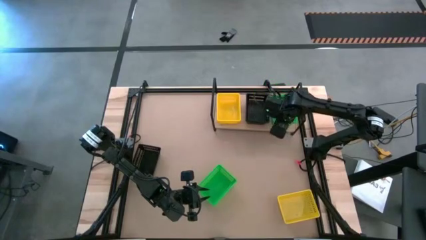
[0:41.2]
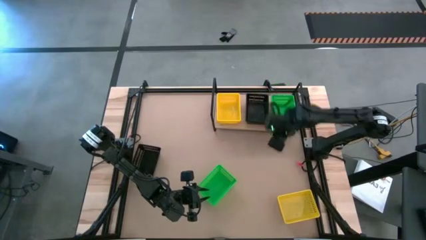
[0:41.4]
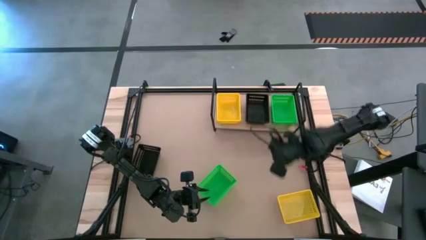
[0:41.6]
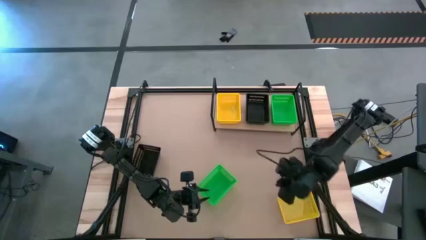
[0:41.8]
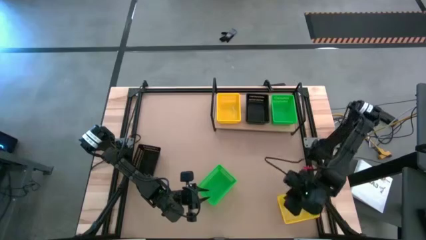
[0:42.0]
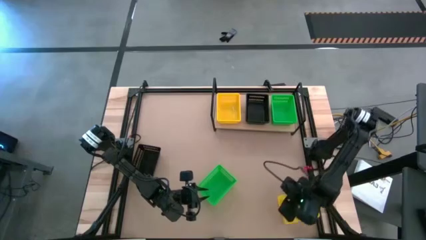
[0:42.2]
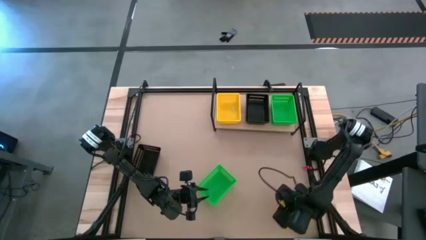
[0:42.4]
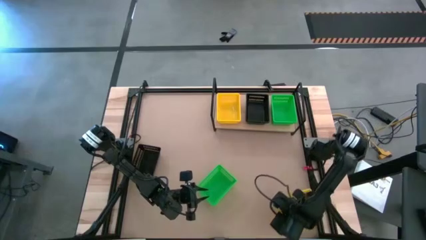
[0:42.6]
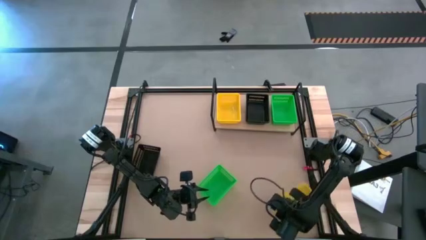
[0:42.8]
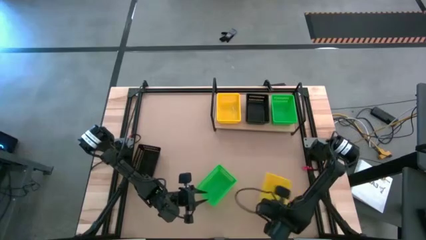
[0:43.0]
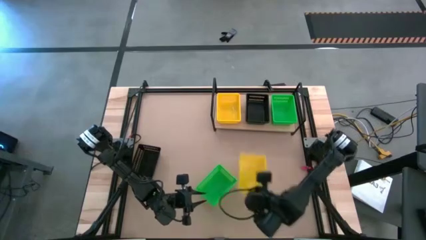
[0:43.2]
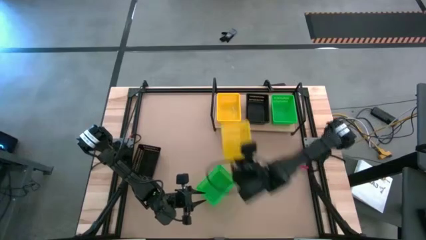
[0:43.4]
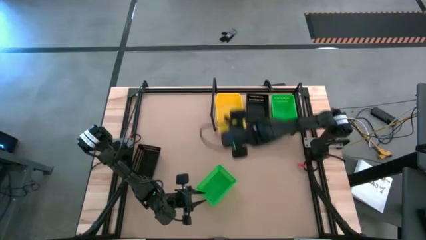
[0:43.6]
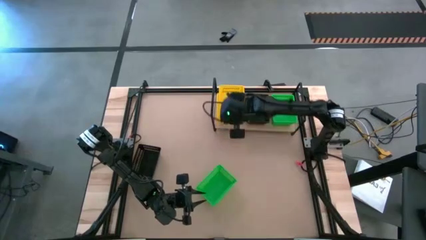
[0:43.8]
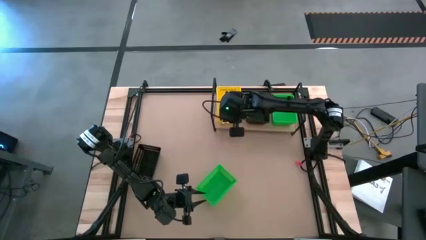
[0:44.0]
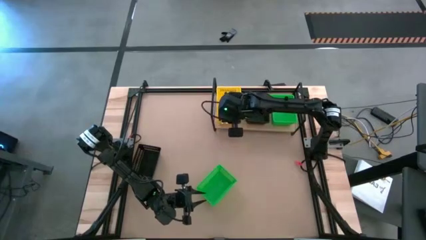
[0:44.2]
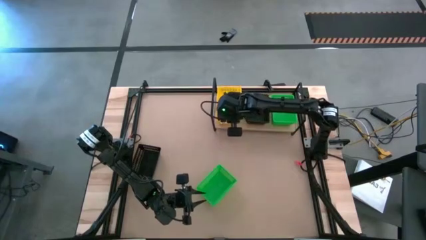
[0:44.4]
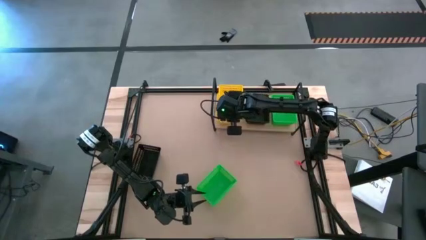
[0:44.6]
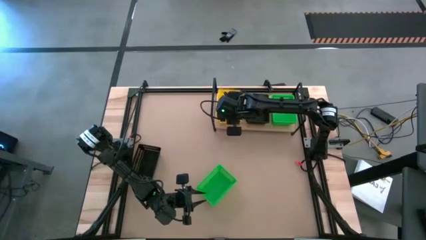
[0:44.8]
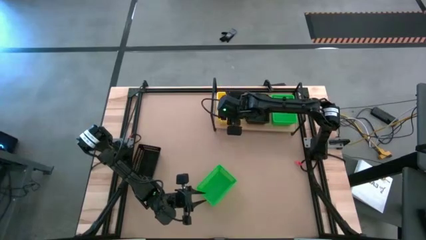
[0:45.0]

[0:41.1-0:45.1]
Task: Stack baskets on shelf by color
Stack the yellow bin on top of the yellow bins on the shelf

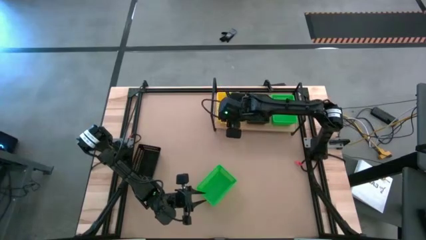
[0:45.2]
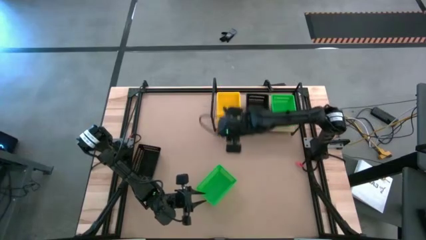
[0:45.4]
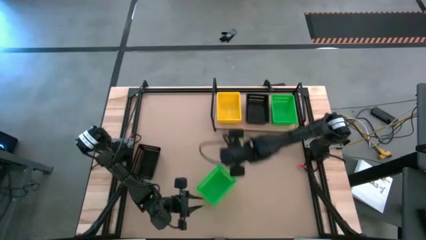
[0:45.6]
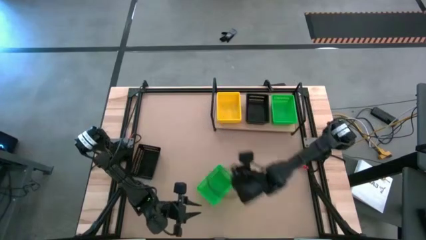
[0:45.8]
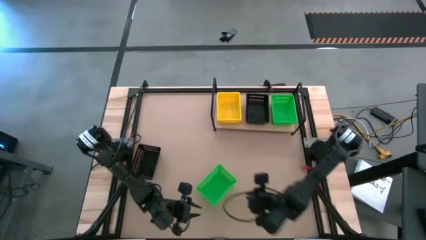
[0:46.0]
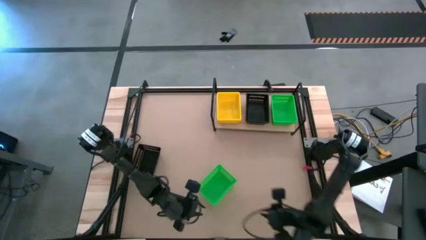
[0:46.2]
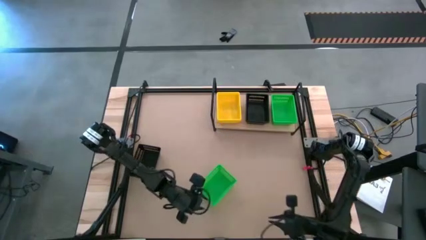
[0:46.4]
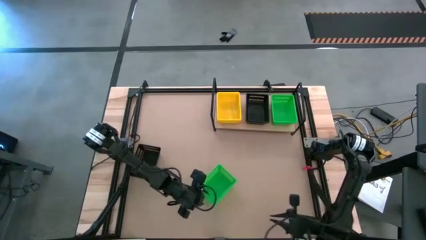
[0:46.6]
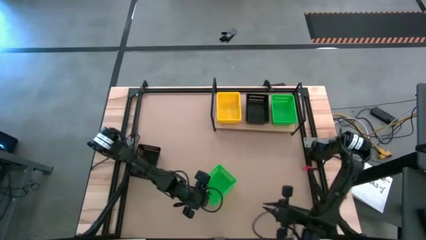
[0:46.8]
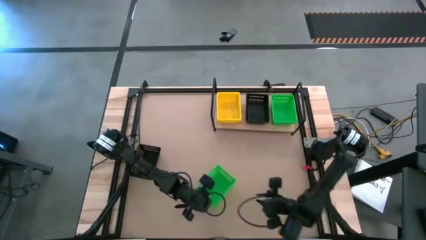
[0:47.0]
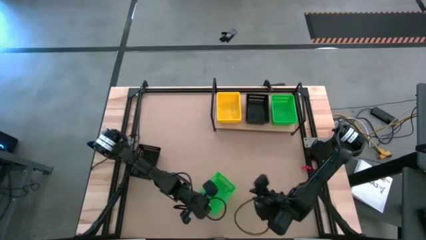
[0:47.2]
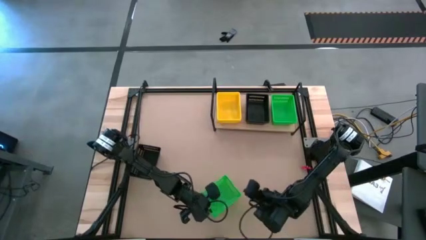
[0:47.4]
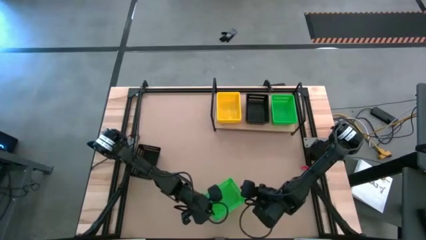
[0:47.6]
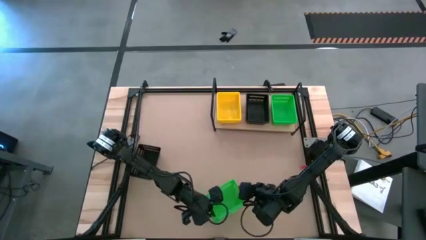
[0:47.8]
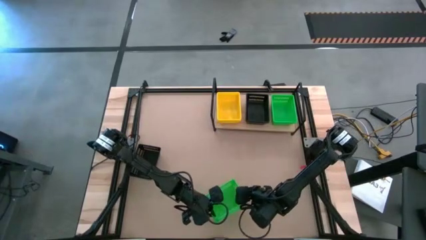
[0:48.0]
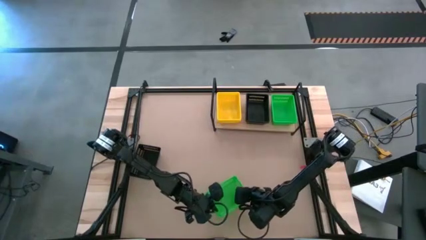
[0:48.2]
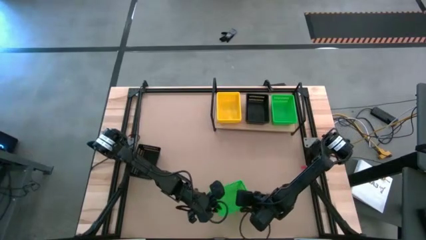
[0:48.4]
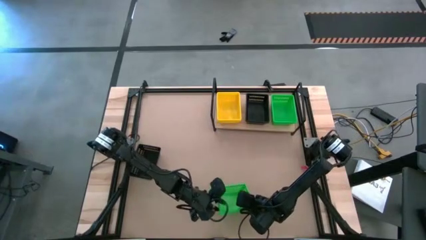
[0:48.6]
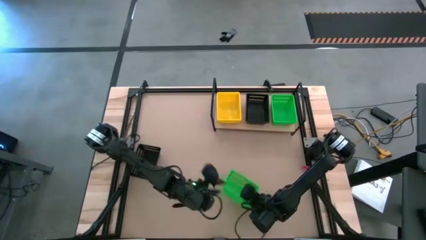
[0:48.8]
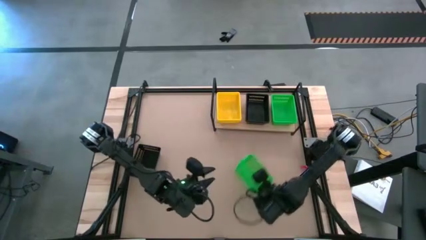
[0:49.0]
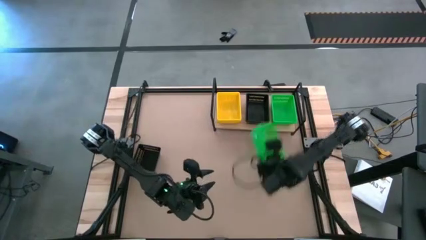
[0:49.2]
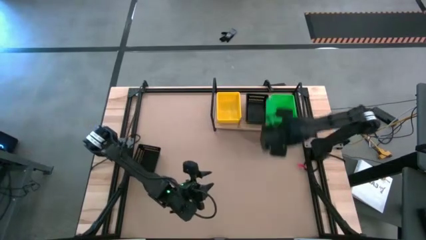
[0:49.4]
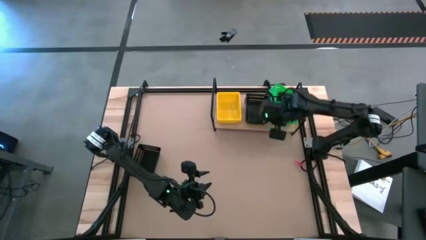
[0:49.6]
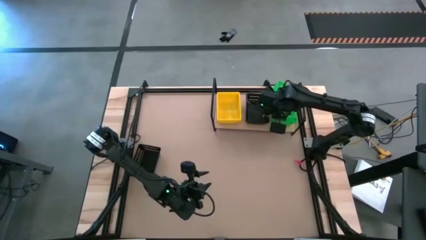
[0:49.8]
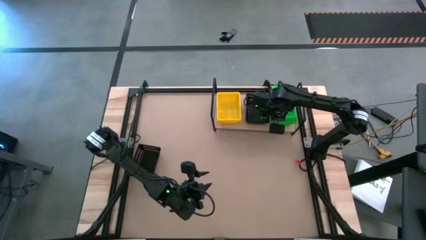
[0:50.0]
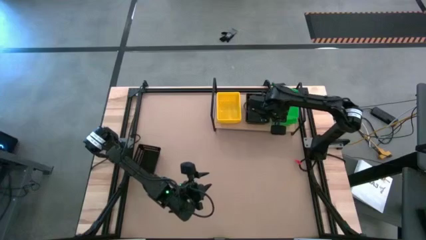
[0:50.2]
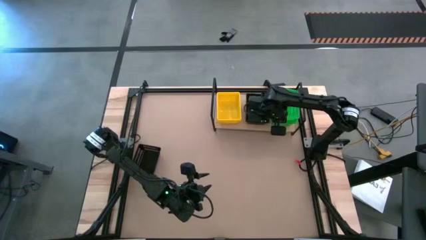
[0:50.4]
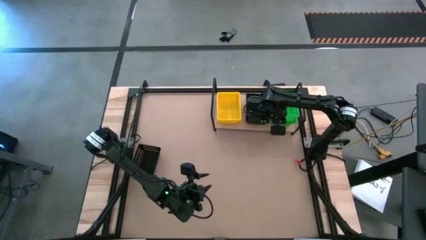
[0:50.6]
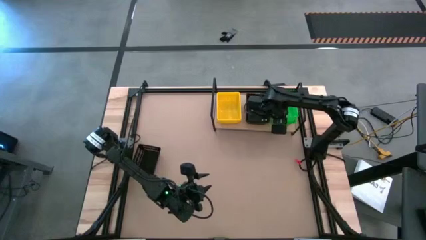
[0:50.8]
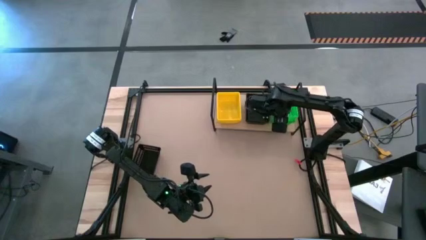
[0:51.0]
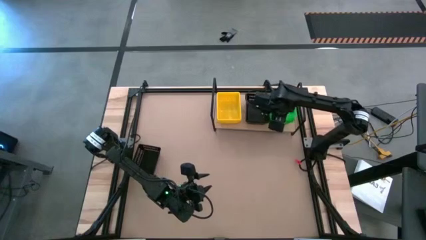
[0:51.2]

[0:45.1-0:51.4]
Stack the green bin on top of the green bins on the shelf

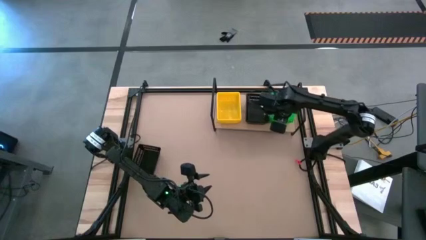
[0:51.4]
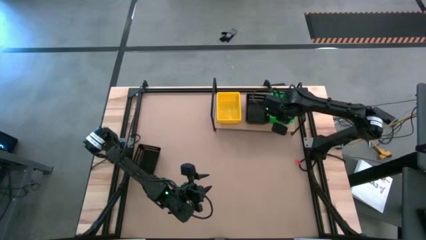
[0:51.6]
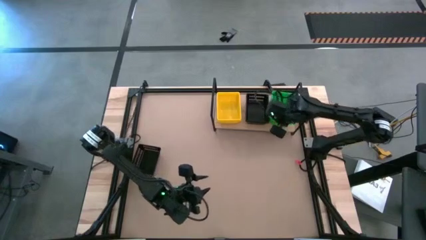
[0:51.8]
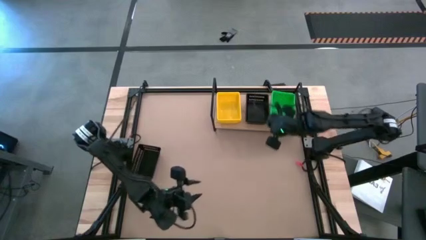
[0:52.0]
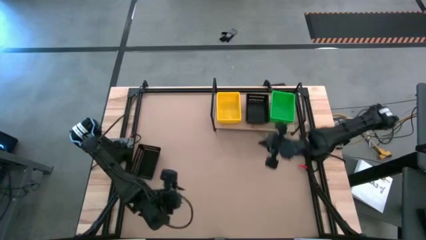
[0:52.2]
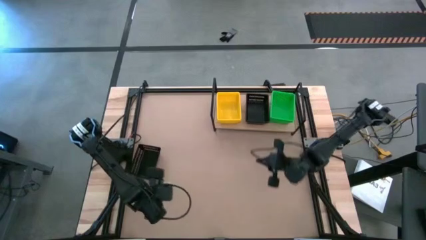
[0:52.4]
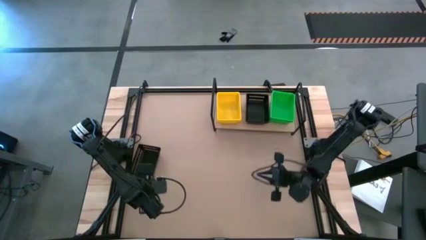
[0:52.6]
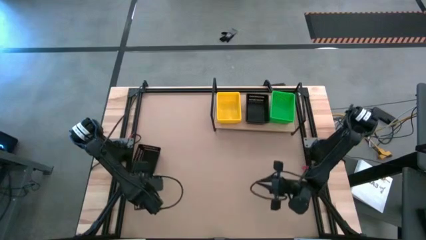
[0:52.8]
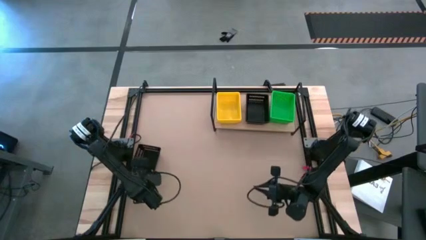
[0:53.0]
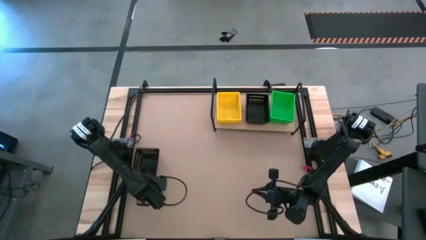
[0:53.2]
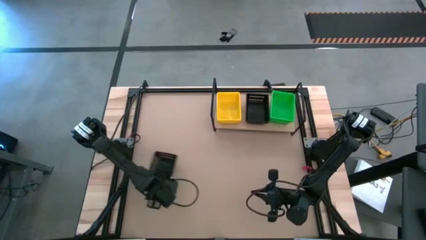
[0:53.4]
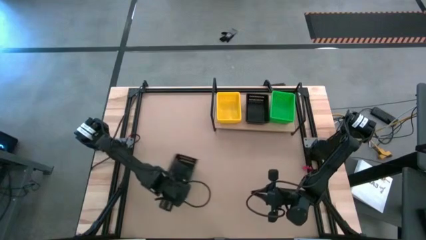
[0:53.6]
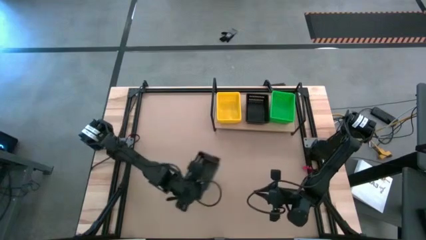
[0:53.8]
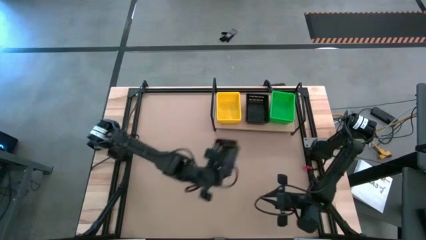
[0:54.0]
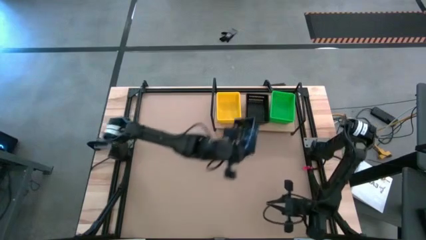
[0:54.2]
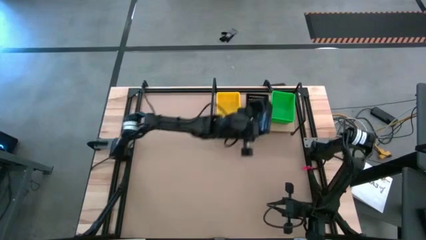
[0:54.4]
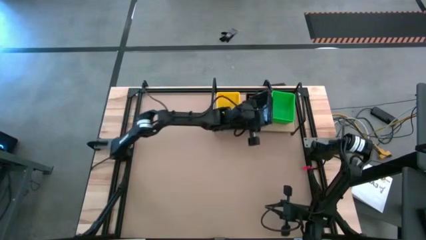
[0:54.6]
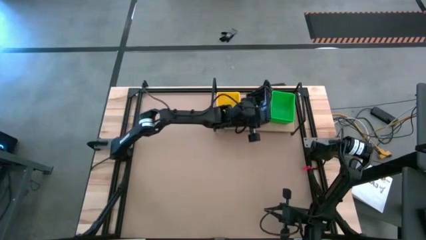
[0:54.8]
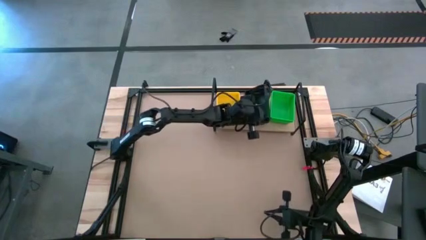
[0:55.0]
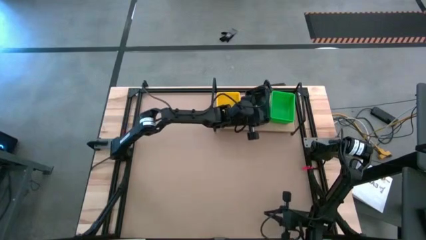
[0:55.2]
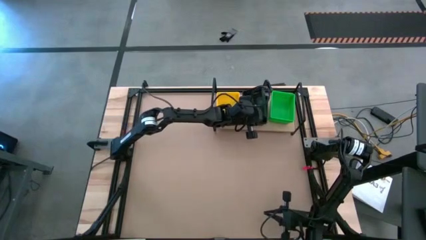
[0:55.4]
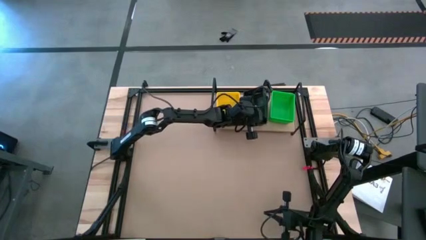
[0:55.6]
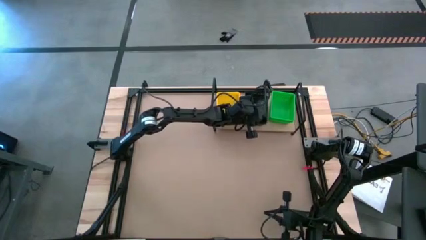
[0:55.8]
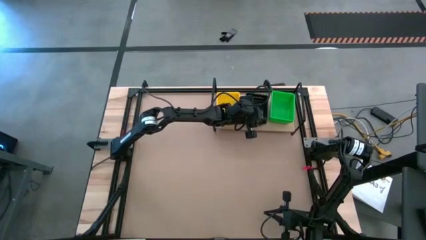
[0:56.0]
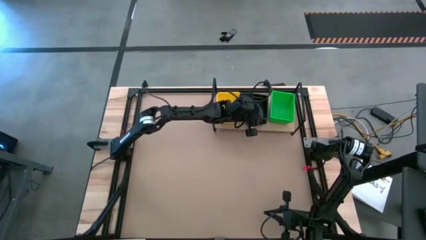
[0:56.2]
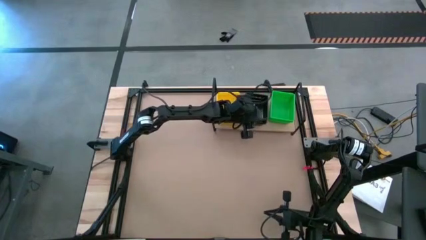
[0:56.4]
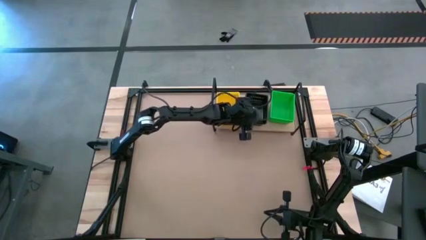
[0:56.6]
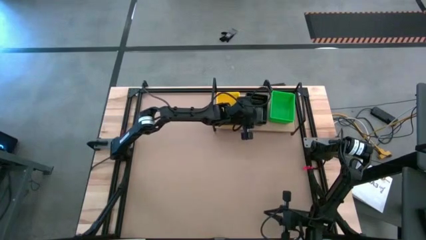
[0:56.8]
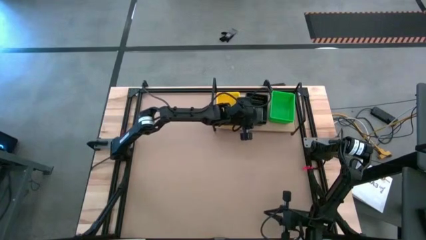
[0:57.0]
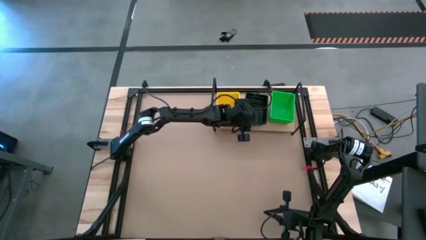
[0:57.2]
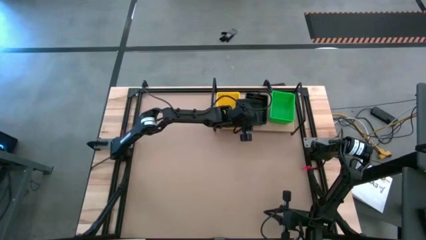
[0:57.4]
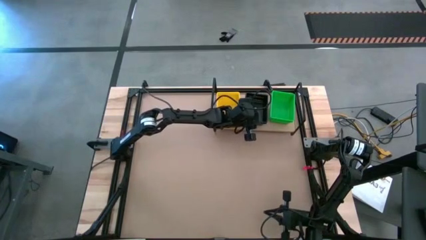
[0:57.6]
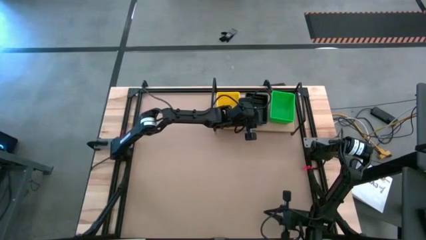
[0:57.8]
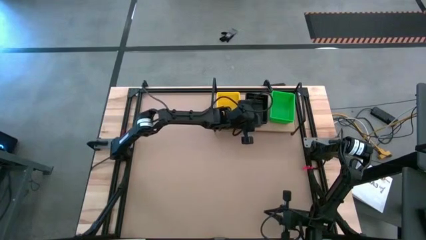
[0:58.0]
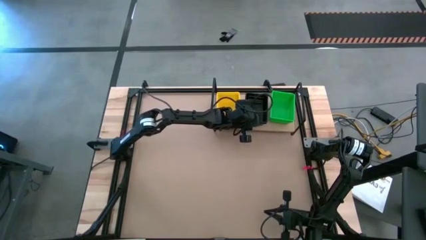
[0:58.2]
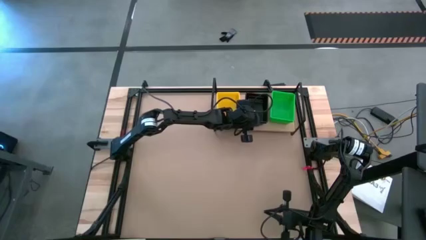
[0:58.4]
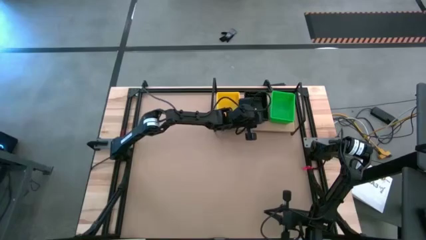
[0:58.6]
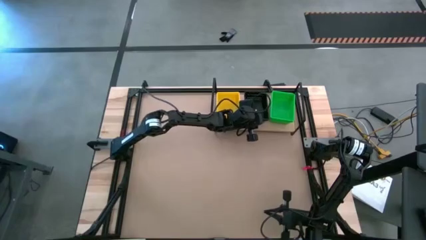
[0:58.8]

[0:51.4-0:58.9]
Stack the black bin on top of the black bins on the shelf
